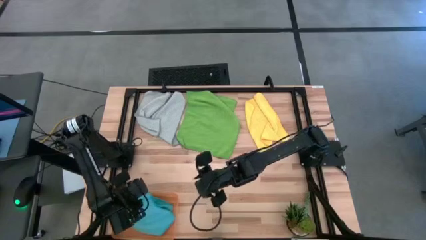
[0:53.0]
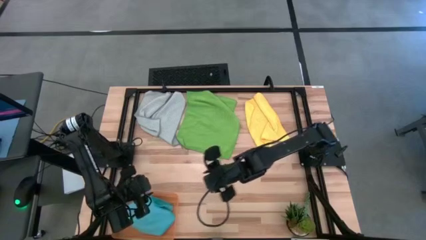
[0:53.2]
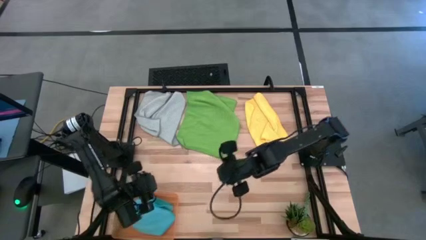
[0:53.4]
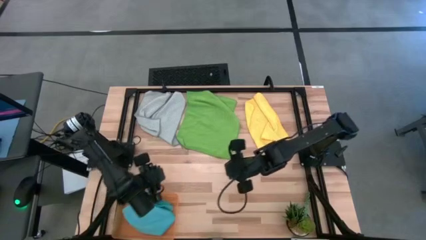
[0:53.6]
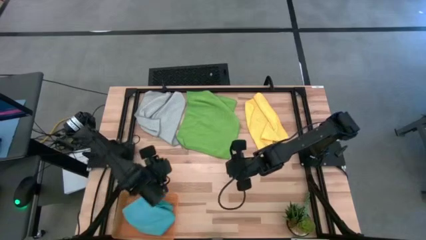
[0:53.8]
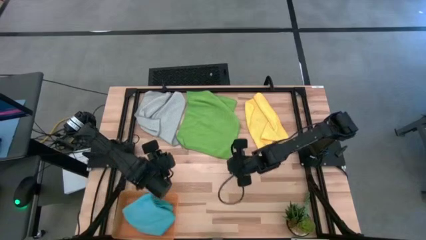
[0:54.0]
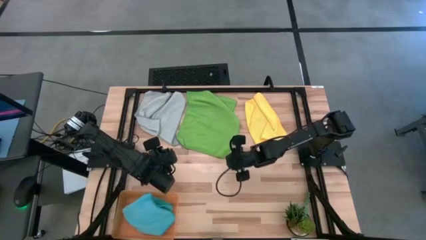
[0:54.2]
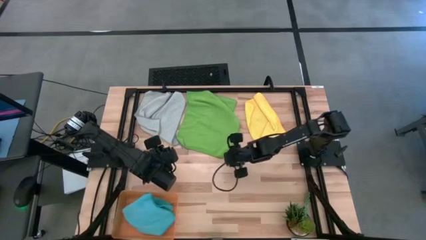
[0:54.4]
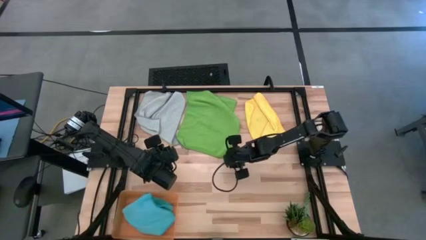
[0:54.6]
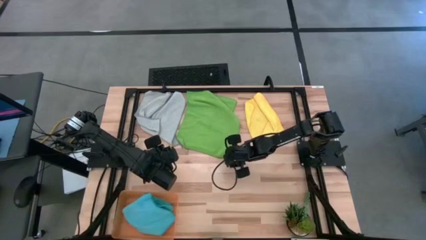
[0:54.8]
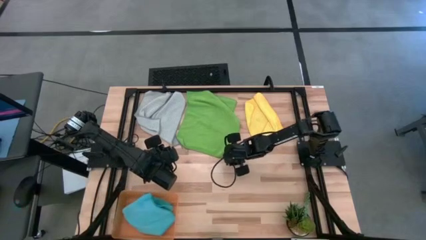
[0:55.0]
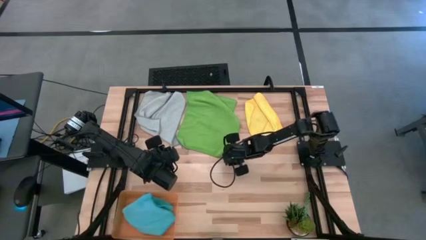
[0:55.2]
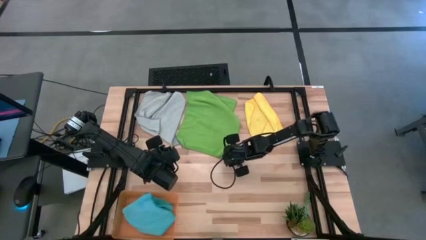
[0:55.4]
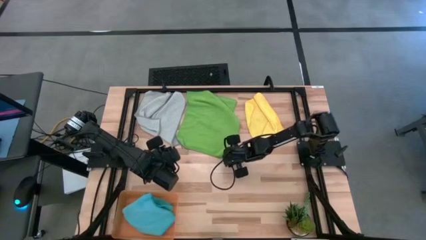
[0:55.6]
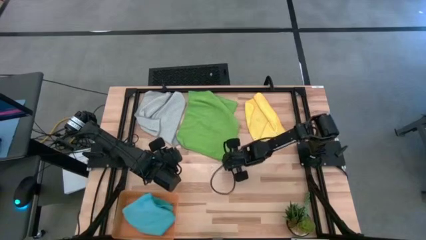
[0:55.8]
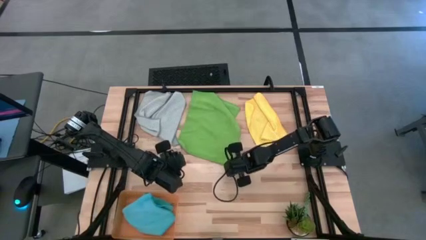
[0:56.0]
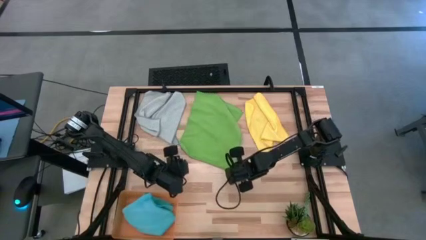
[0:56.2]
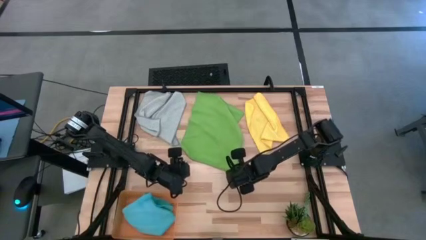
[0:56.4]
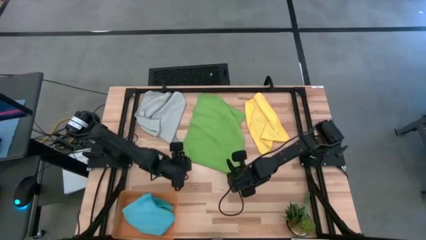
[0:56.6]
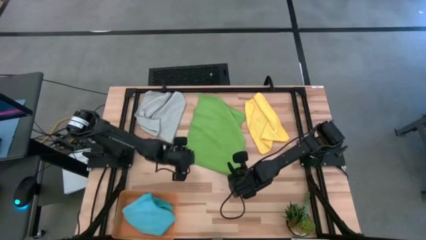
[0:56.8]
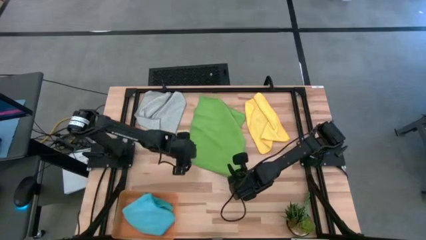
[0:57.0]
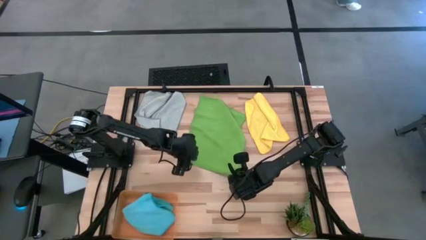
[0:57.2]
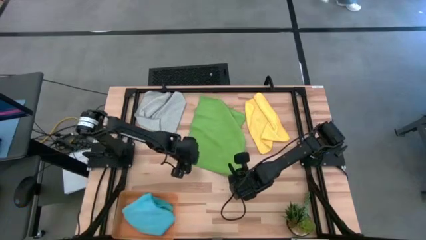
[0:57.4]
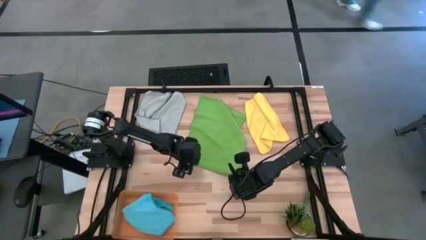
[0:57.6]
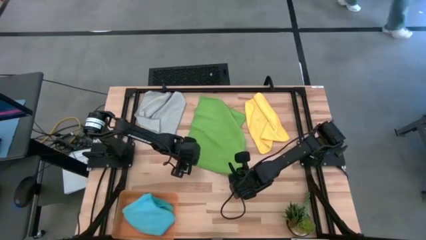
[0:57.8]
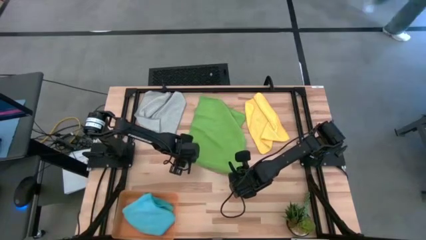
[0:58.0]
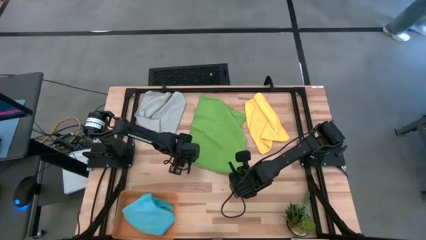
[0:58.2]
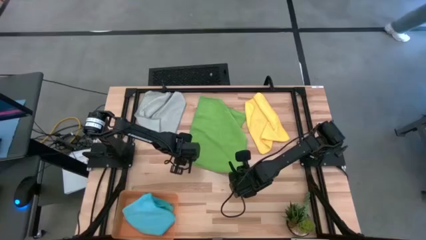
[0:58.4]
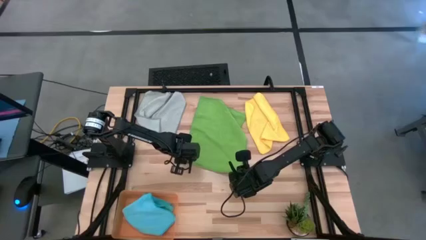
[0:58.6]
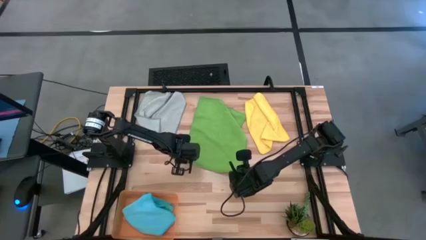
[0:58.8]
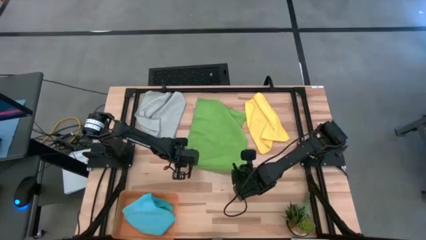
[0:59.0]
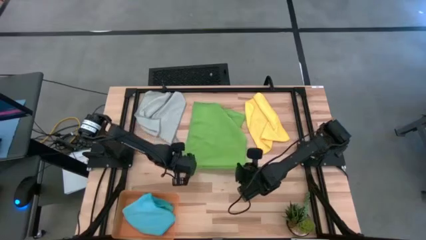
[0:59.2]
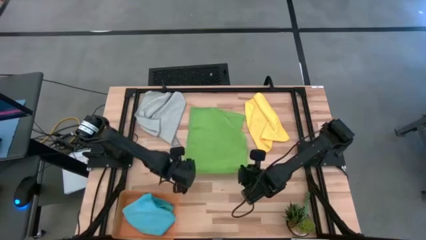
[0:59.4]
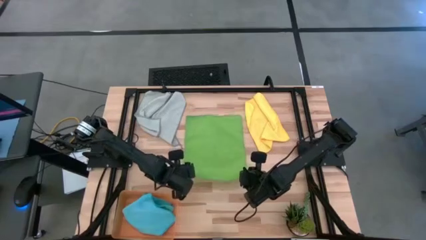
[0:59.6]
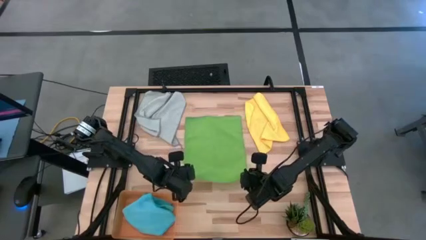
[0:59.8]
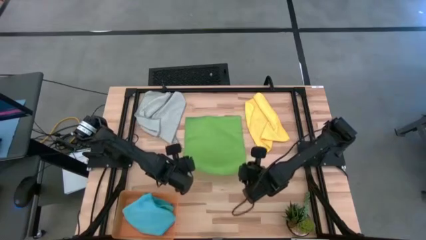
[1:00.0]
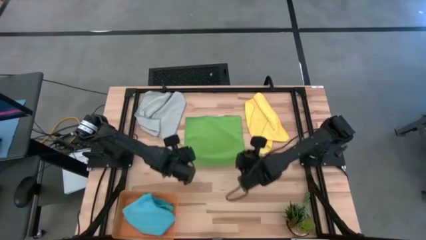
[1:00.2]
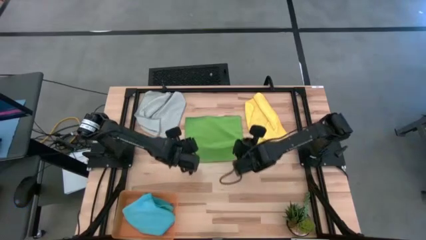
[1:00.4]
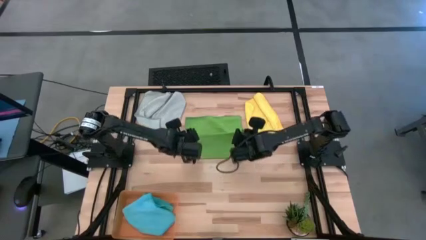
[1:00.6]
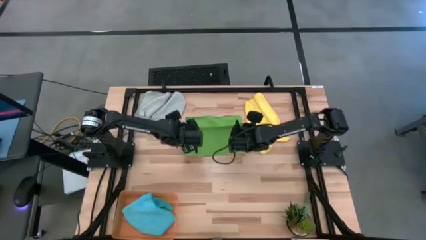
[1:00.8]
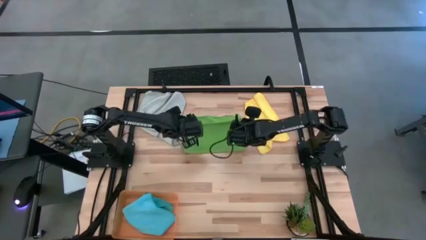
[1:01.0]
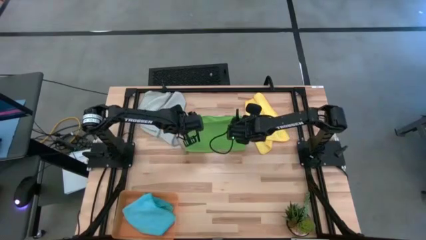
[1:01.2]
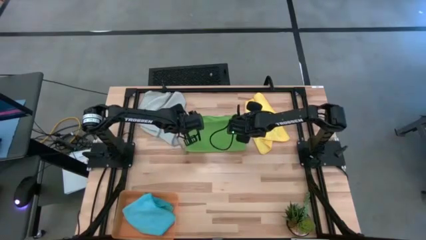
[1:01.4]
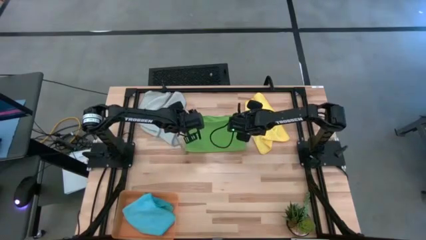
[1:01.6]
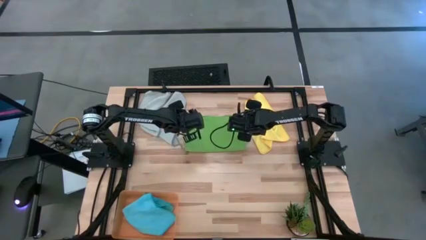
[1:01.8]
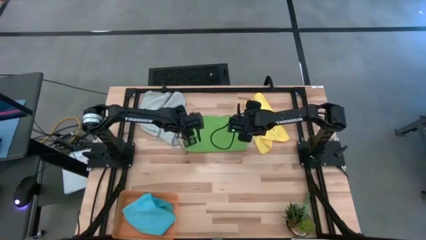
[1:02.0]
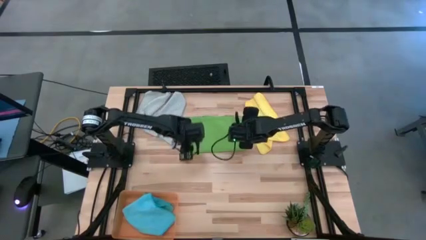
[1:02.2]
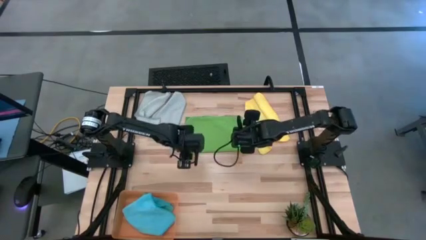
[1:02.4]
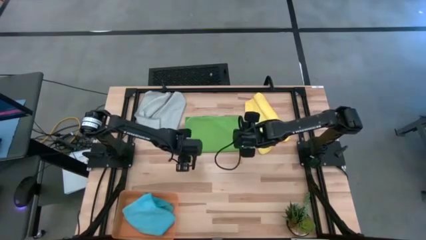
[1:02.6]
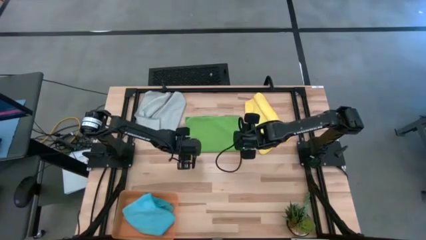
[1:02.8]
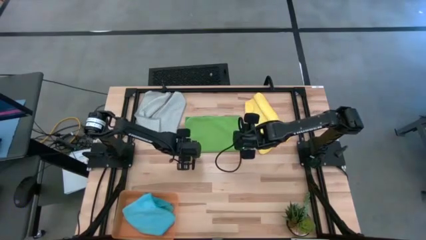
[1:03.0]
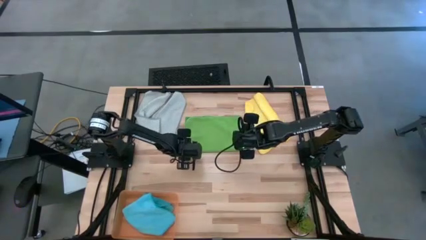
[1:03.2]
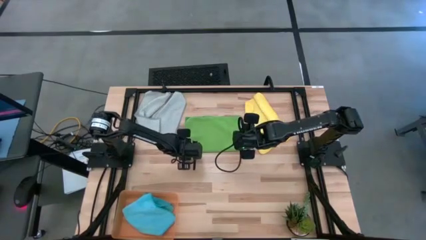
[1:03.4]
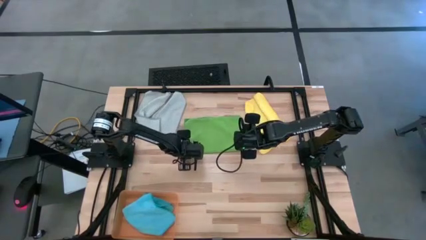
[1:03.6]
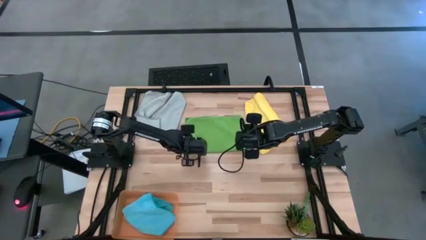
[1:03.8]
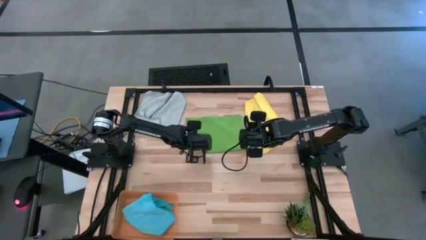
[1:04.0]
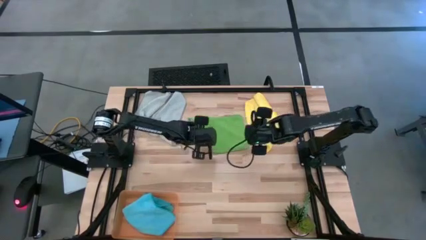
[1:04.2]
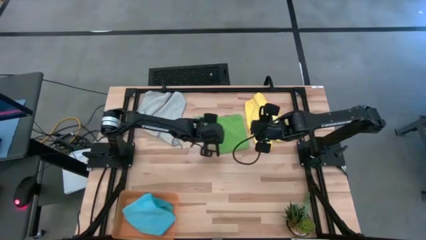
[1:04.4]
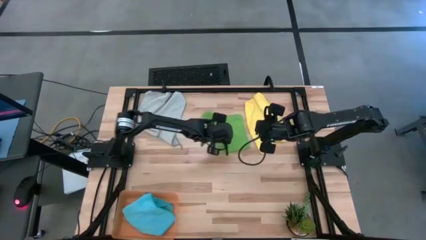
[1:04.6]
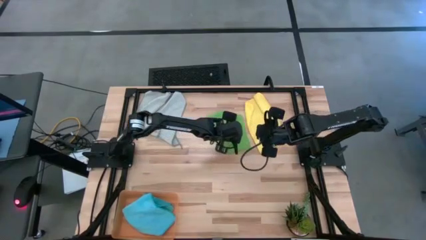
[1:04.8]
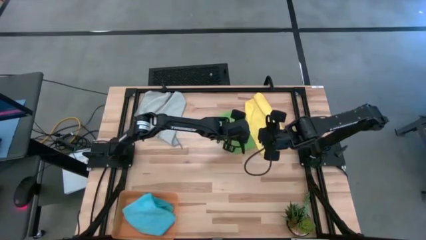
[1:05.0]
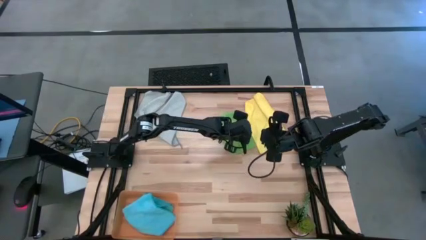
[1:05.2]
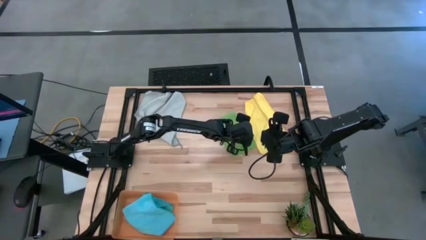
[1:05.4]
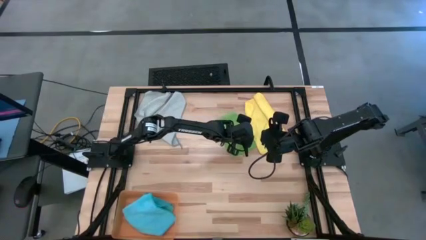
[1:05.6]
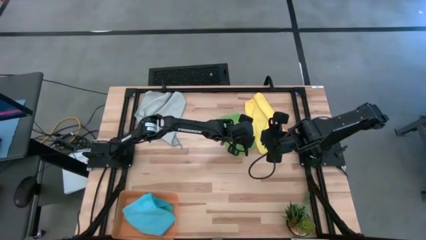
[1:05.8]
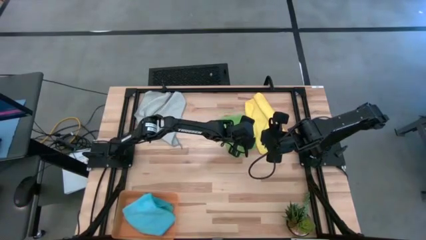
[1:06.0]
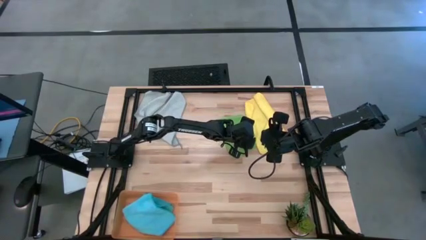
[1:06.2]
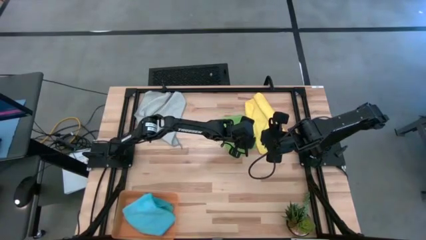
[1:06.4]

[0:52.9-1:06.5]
Task: Fold microfiber towels
Fold the green microfiber towel

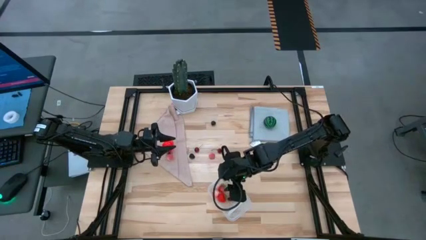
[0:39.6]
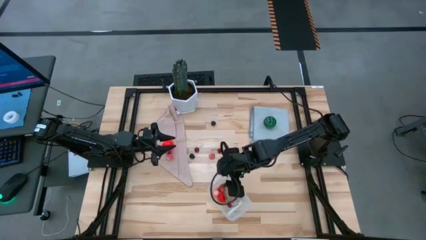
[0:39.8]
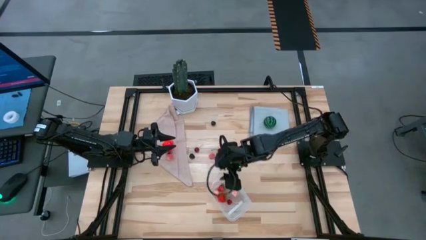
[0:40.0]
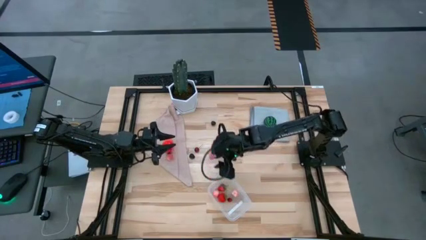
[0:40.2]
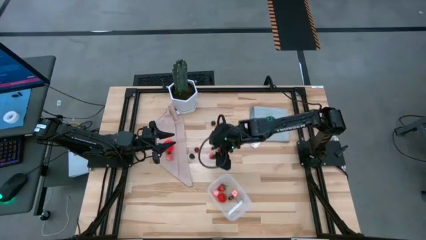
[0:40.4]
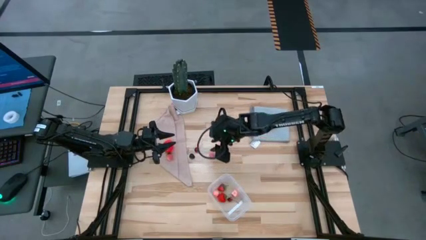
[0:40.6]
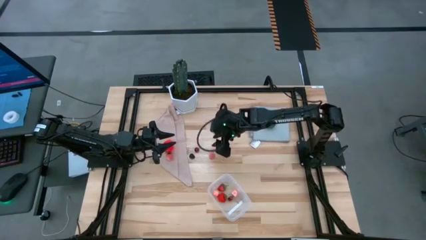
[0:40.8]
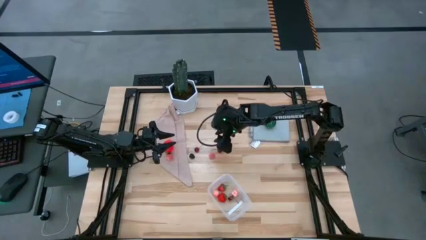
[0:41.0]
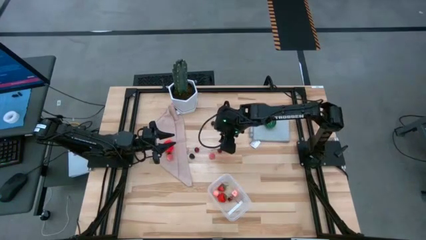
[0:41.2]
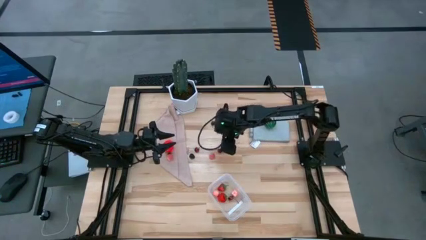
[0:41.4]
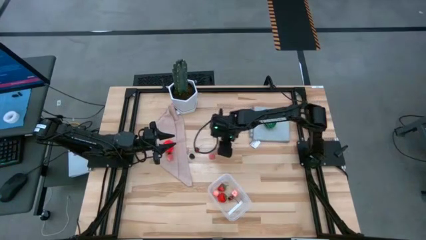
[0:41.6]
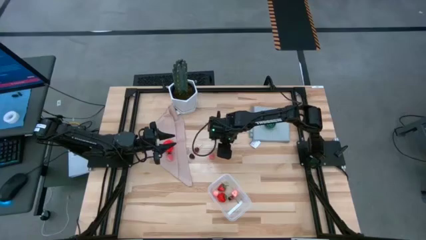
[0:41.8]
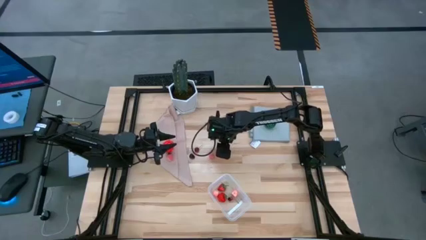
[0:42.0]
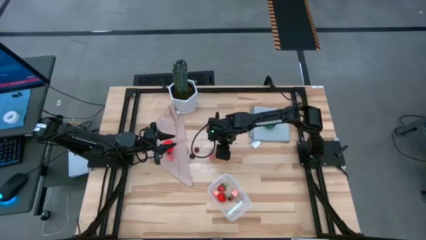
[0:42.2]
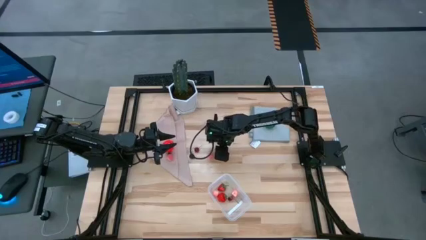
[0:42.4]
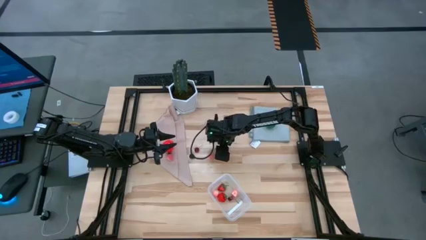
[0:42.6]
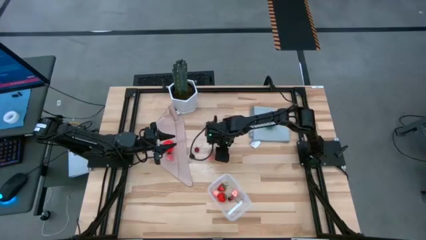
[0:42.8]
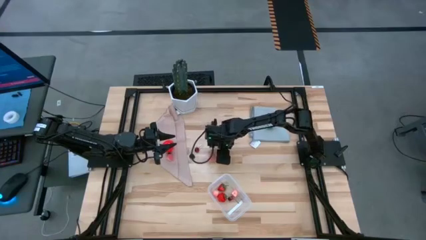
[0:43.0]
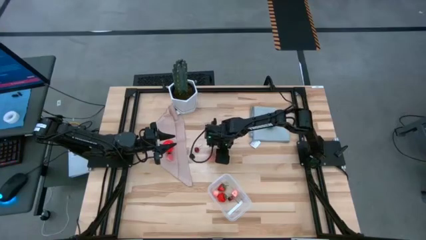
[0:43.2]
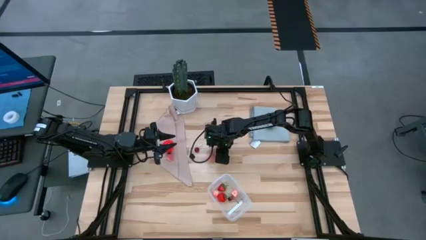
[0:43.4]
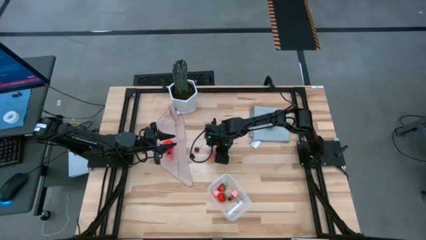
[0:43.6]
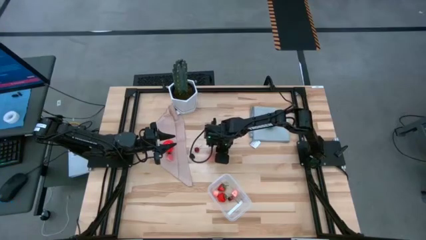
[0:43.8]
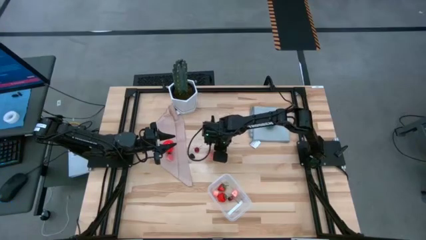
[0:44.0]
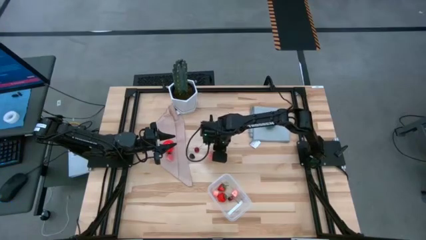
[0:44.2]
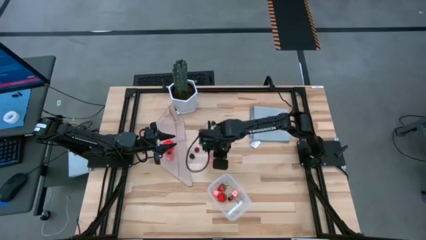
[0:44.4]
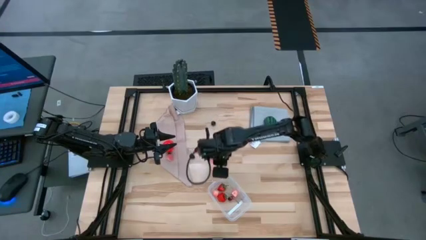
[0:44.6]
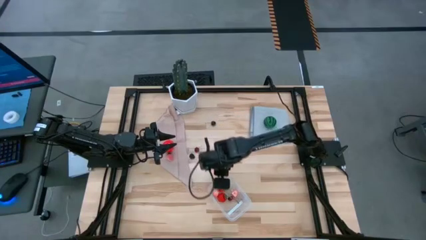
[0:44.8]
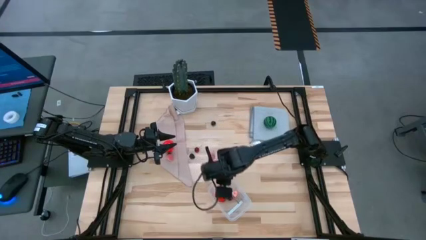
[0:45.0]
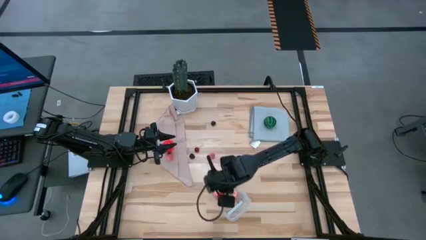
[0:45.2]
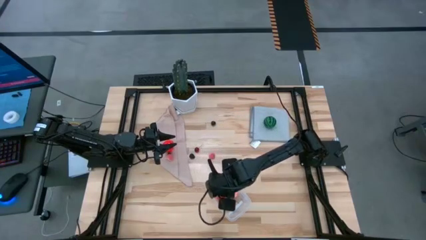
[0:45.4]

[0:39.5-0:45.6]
Task: Pick and placing Produce into tupperware
Put the right red cherry into the transparent bin
